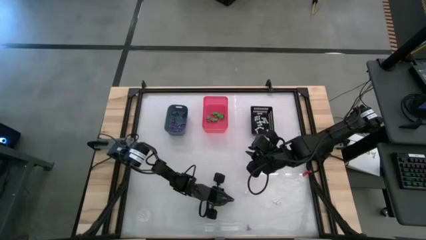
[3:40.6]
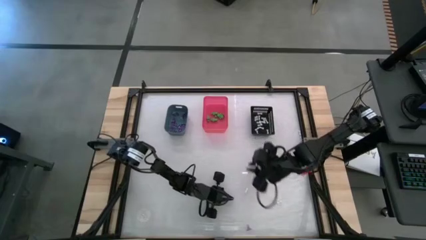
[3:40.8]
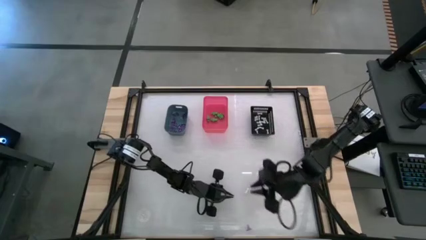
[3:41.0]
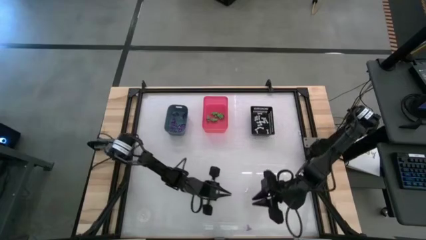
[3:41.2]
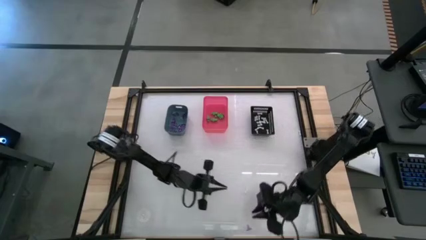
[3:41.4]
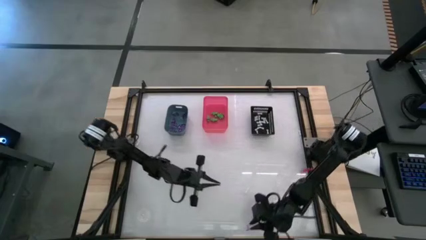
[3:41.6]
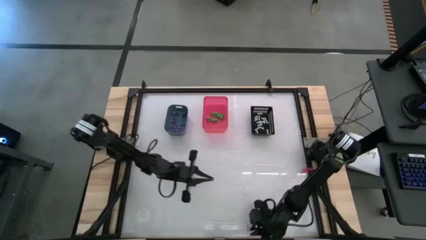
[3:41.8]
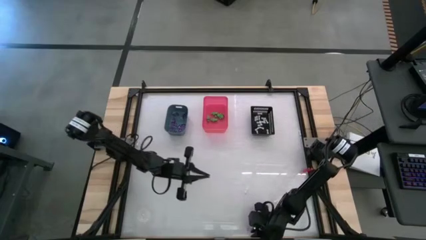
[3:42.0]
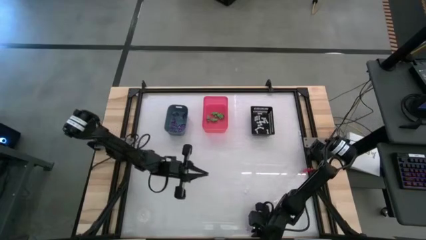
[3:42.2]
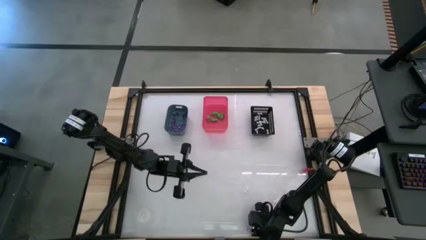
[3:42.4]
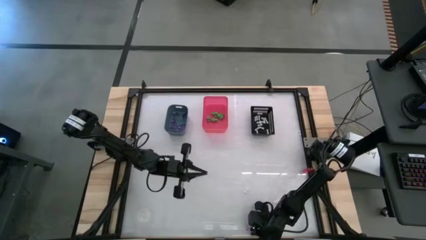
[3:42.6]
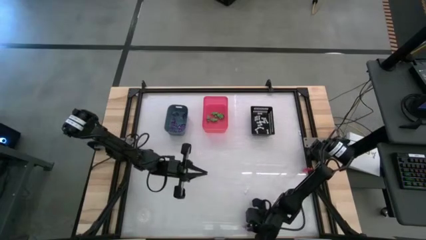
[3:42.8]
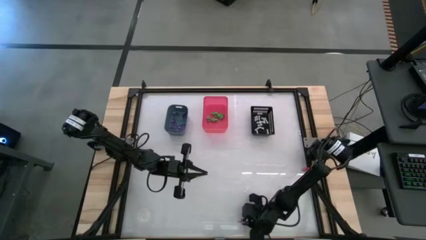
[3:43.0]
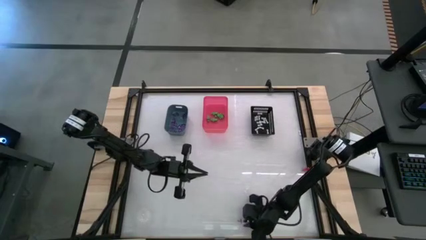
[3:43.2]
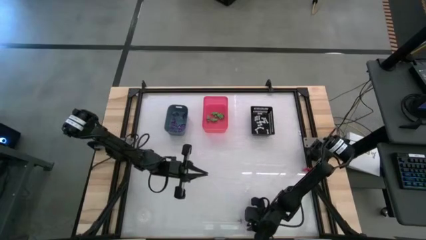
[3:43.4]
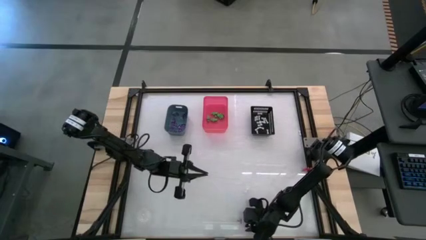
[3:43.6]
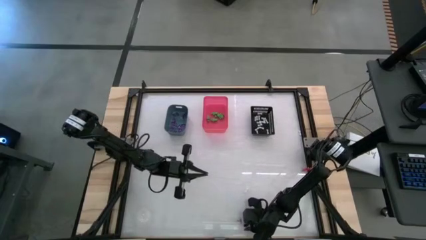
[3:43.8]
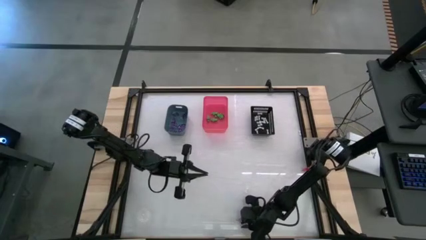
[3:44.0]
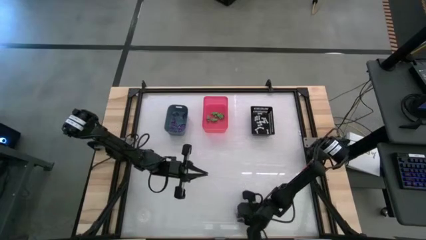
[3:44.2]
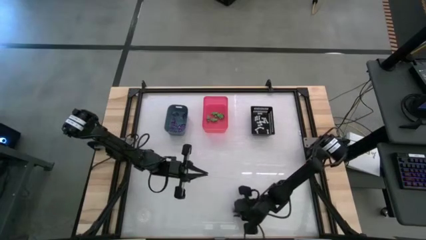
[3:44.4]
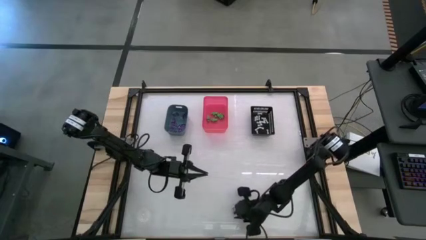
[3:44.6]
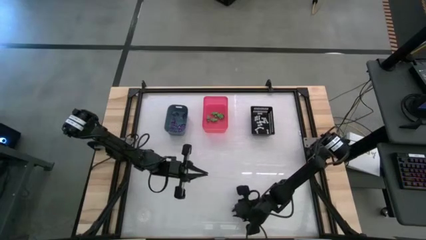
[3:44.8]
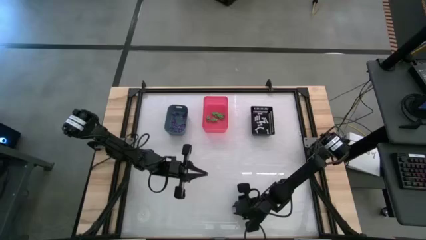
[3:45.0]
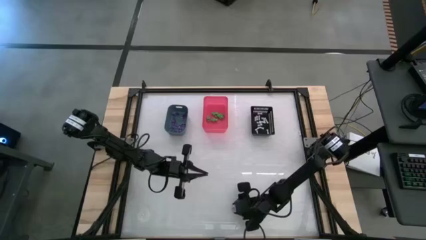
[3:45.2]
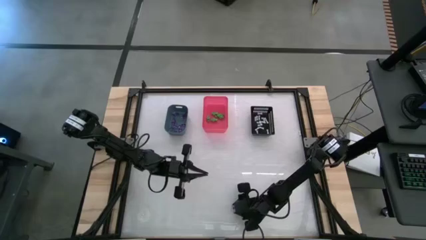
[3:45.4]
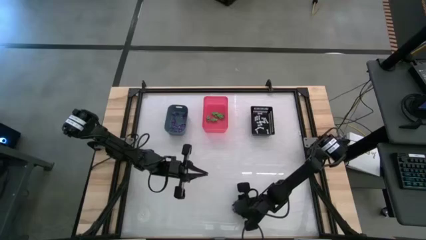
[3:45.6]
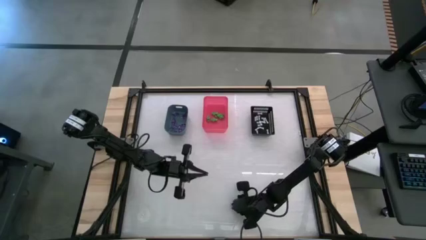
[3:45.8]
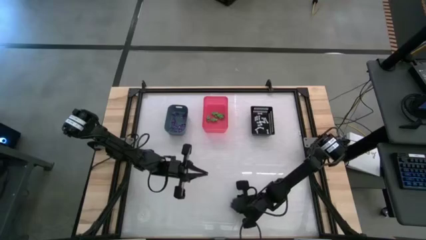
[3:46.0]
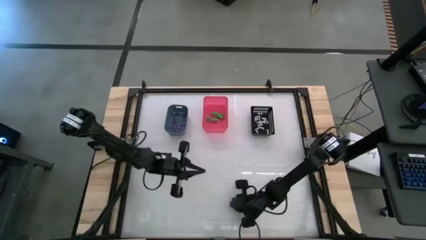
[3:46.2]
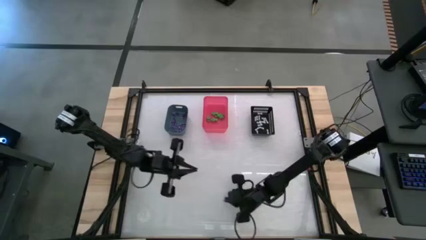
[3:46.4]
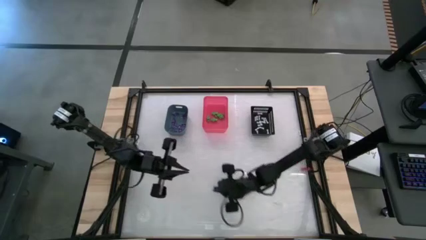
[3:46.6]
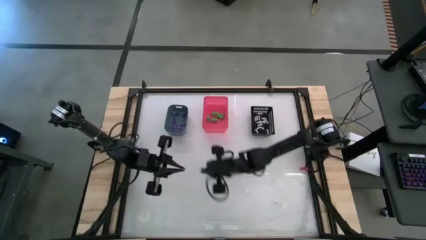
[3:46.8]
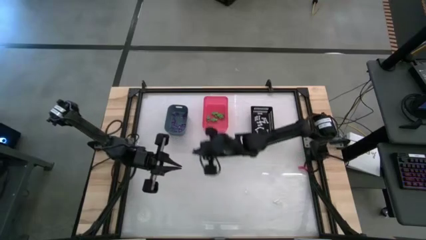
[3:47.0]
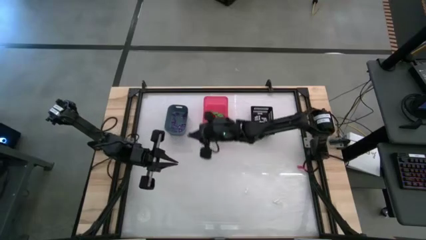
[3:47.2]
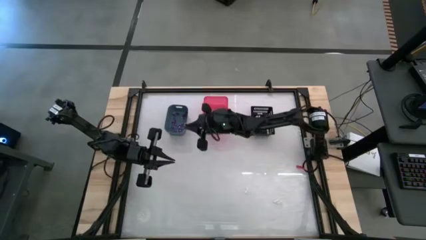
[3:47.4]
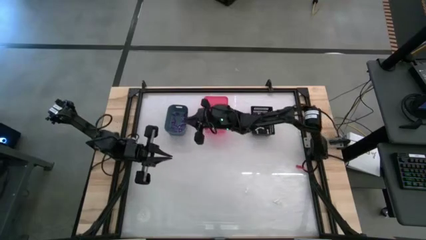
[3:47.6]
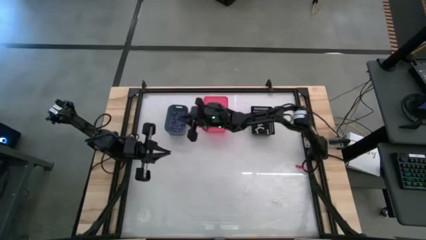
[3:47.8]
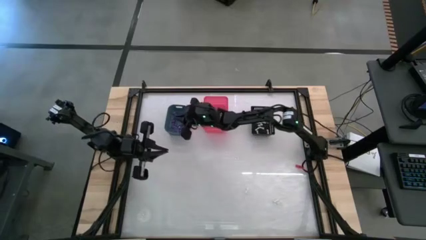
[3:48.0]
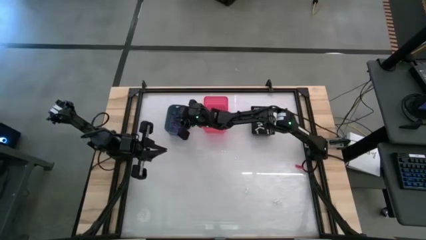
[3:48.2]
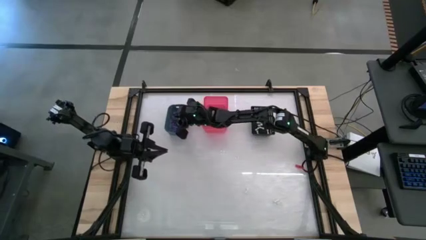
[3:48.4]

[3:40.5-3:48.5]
Task: Sort Halloween decoration
Put the purple witch hat toy into the blue bin

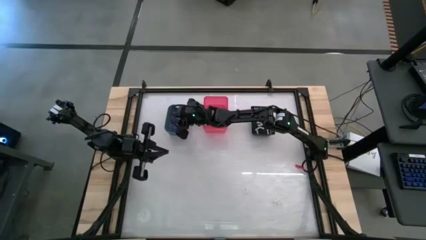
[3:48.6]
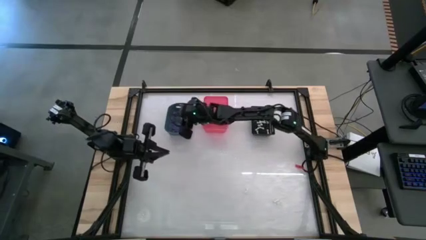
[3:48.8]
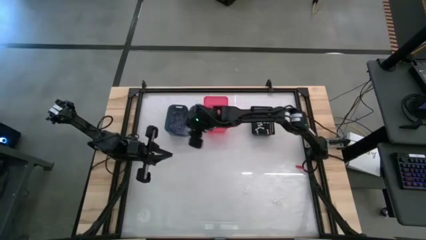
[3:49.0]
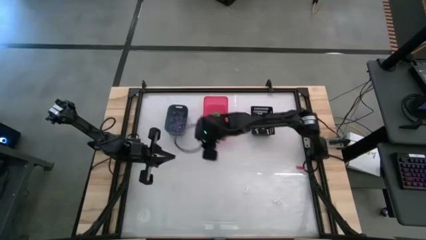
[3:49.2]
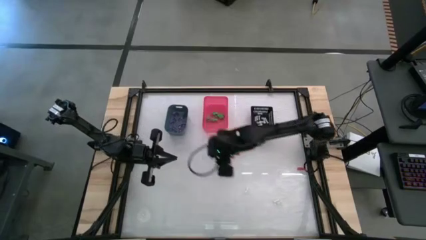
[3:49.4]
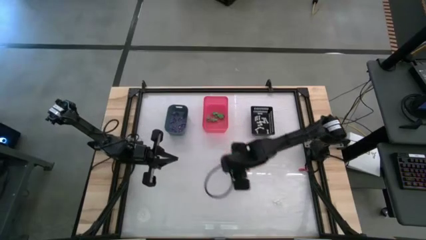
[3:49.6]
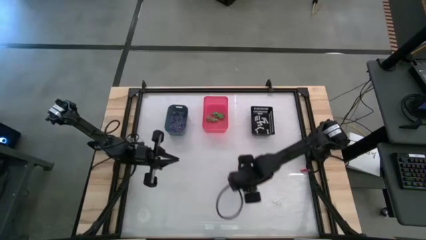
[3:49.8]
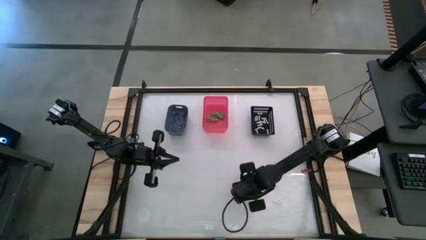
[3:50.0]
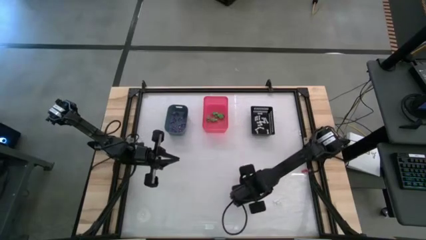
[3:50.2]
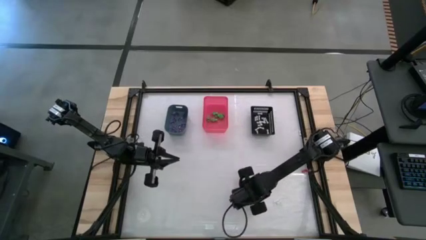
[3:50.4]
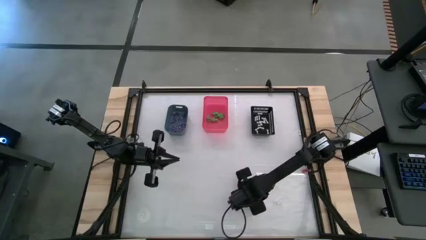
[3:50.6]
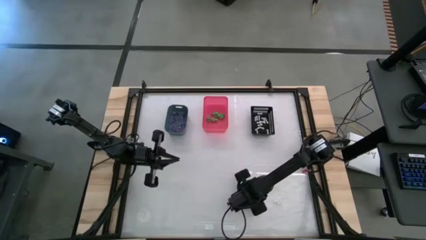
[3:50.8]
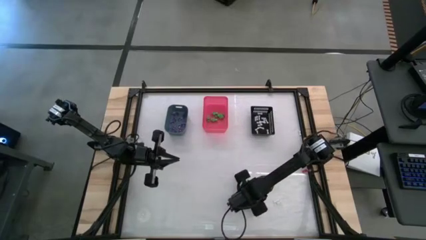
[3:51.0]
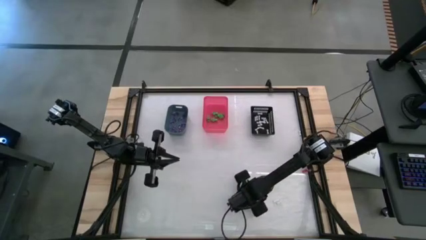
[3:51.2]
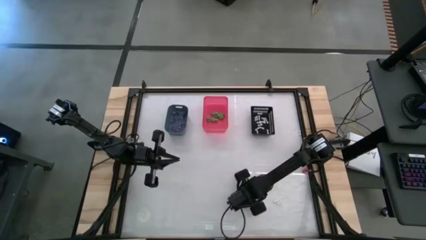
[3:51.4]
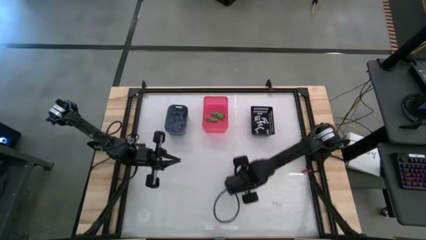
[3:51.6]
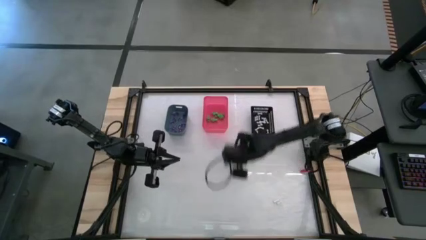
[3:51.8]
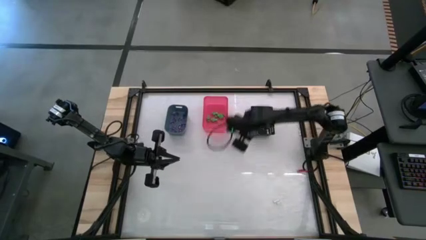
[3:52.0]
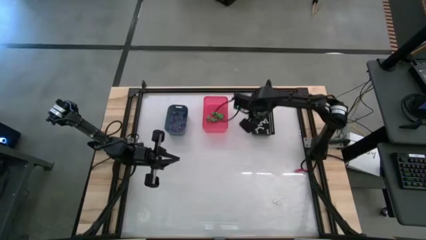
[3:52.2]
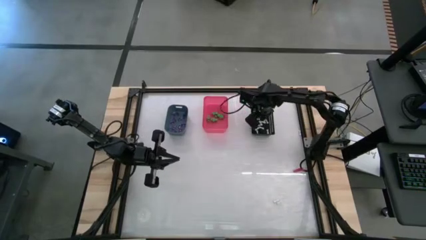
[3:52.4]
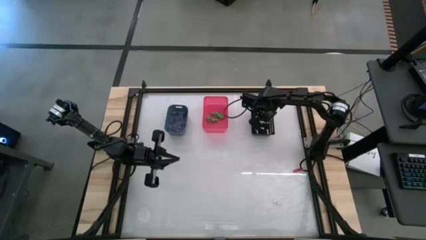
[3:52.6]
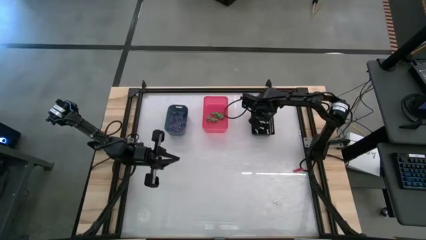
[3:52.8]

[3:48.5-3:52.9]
Put the white bone toy into the black bin

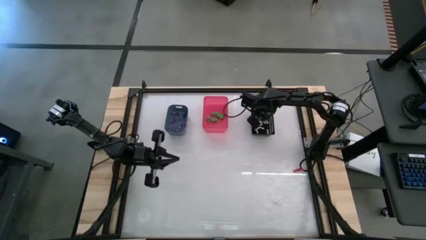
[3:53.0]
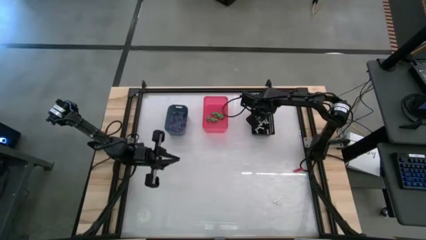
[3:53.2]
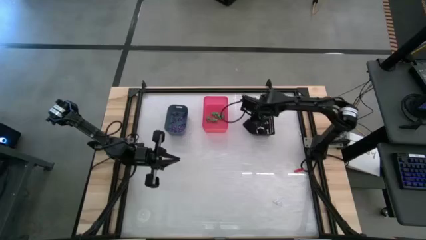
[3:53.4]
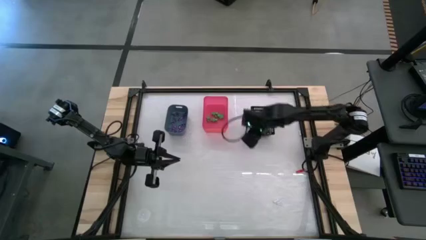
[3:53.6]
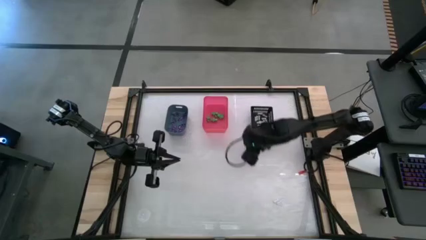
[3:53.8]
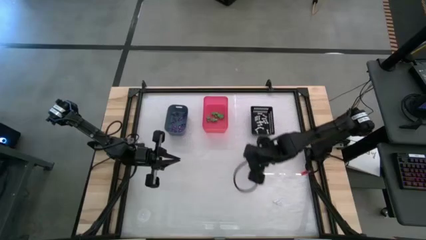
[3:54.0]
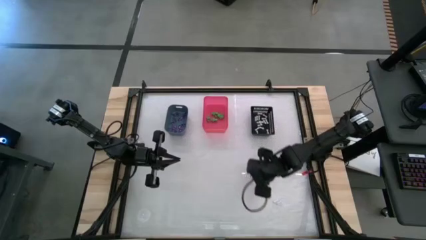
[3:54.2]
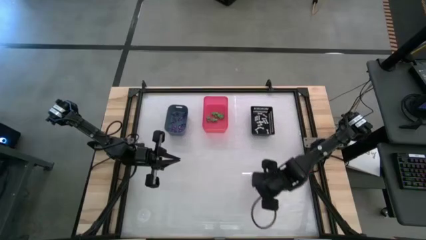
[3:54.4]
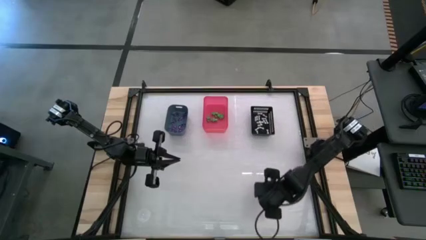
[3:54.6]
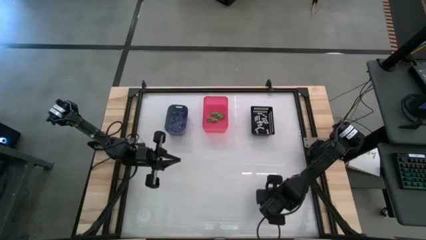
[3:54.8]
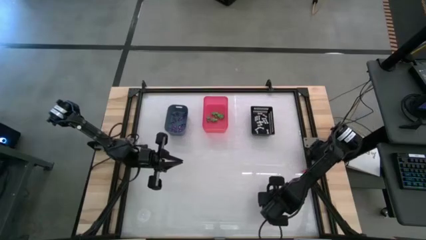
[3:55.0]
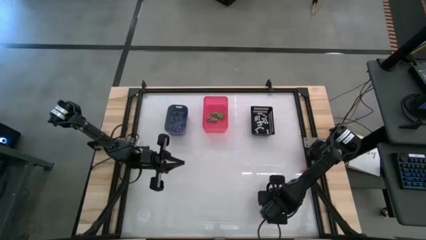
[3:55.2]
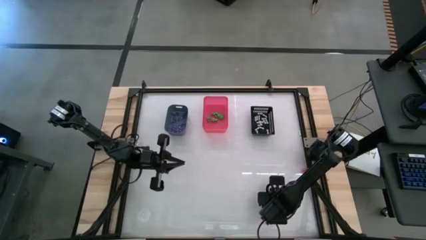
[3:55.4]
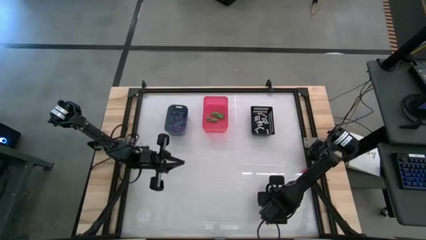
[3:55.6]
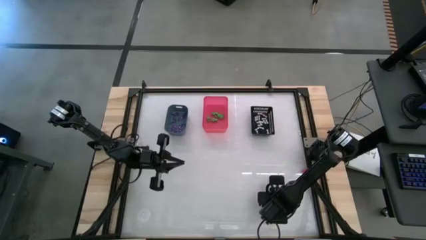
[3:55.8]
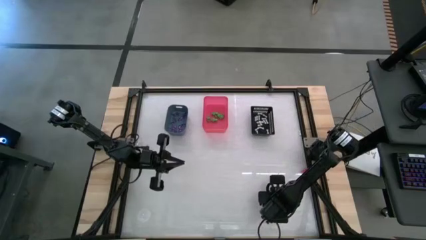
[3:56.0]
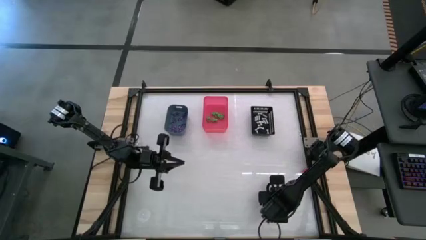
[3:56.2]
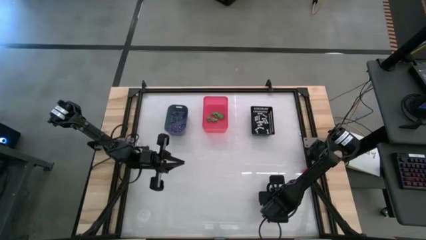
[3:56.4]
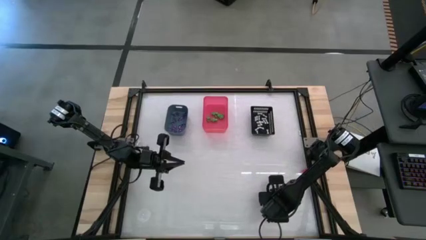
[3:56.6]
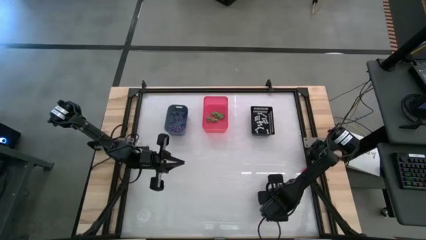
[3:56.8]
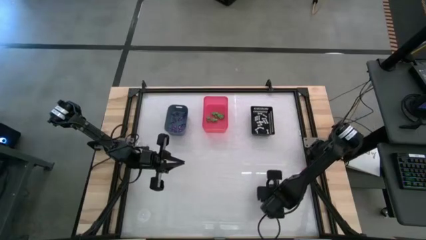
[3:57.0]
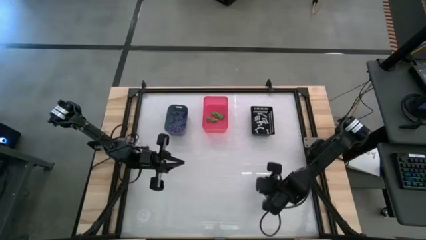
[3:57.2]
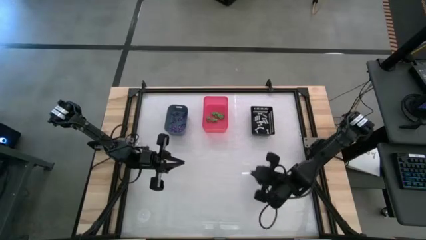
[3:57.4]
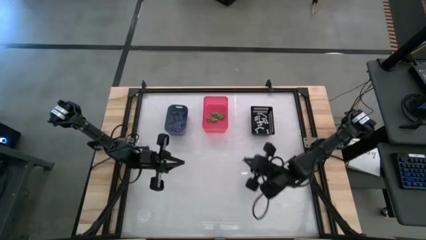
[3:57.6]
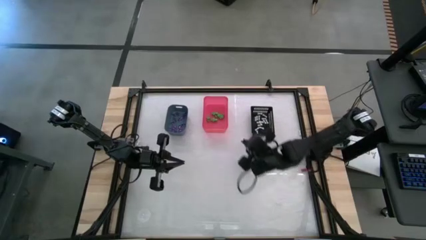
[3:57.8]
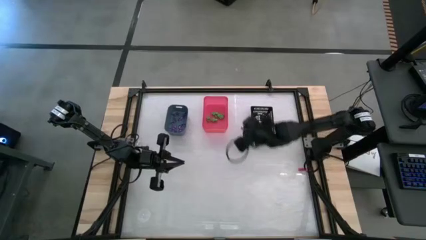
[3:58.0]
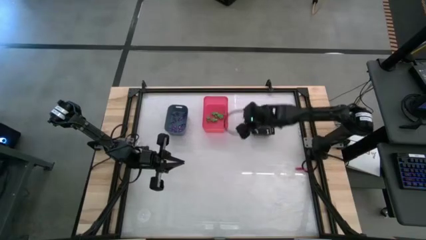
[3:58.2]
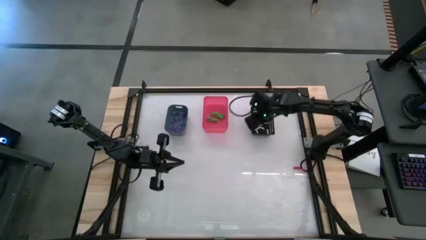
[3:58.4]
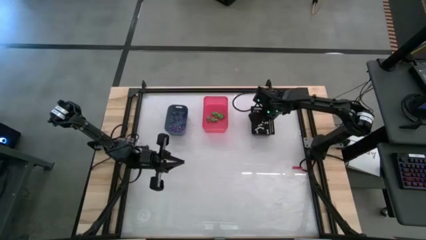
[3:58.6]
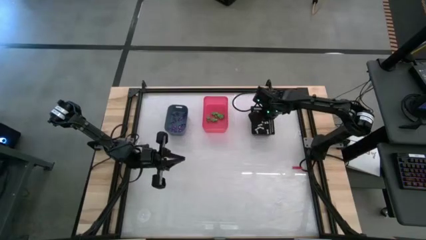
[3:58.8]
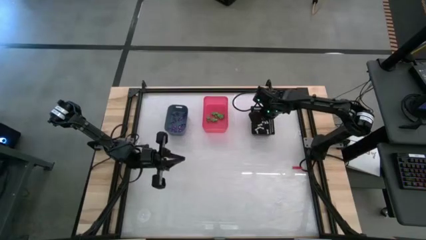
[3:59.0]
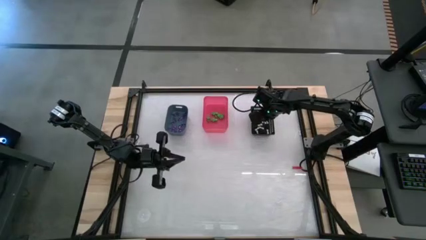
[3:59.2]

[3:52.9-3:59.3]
Put the white bone toy into the black bin
